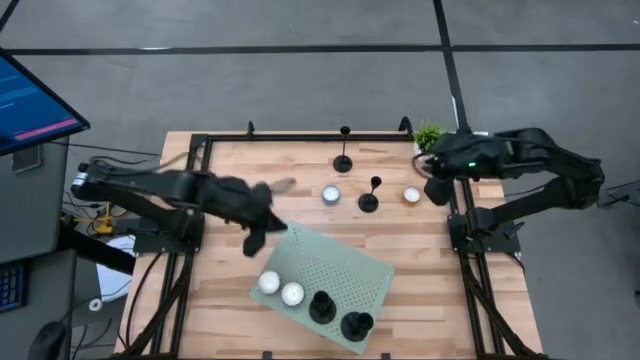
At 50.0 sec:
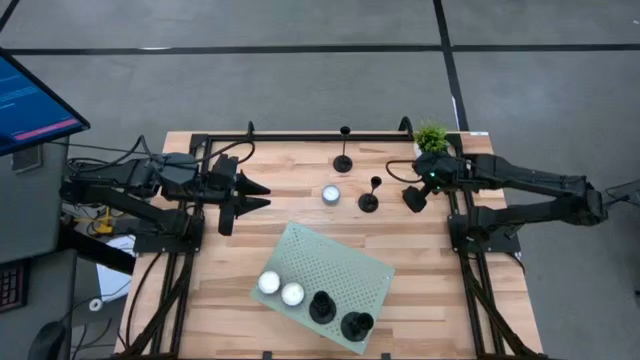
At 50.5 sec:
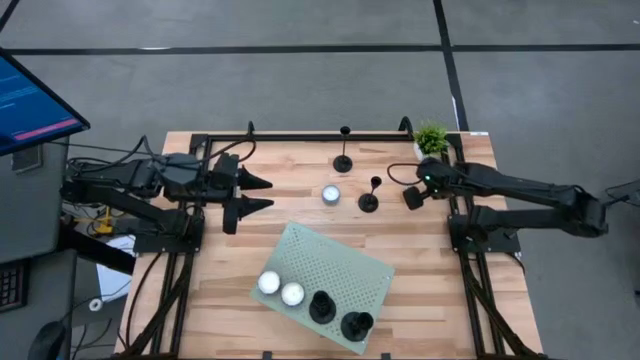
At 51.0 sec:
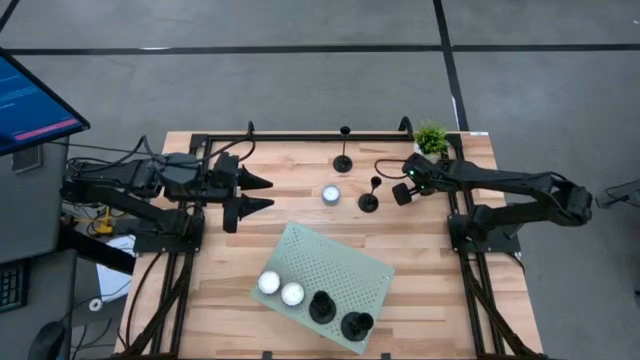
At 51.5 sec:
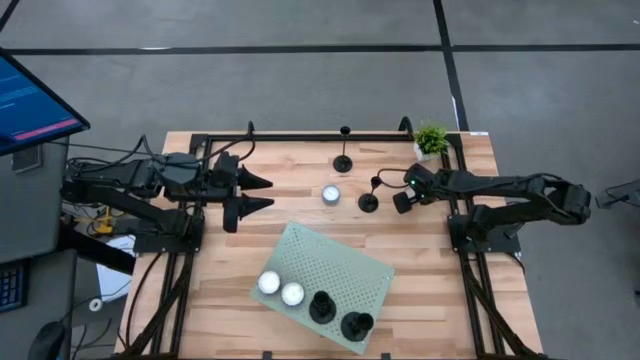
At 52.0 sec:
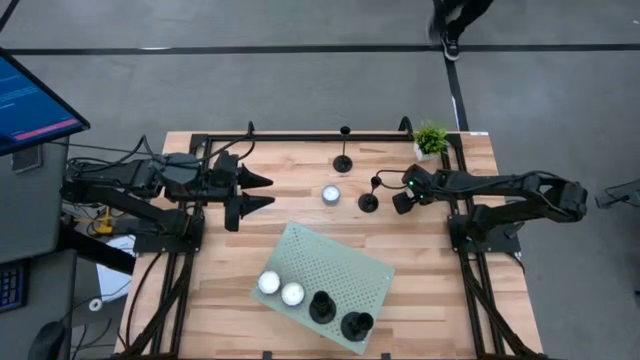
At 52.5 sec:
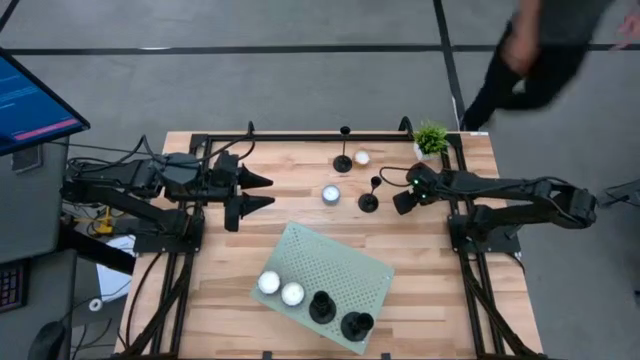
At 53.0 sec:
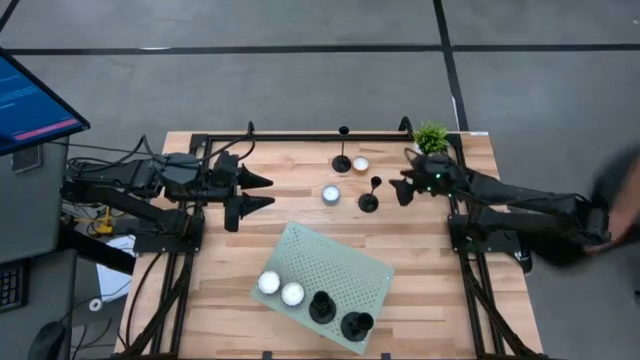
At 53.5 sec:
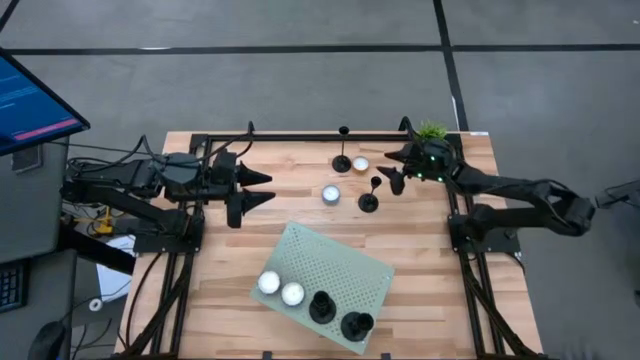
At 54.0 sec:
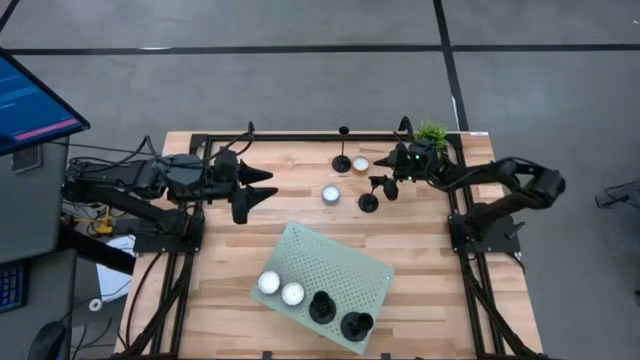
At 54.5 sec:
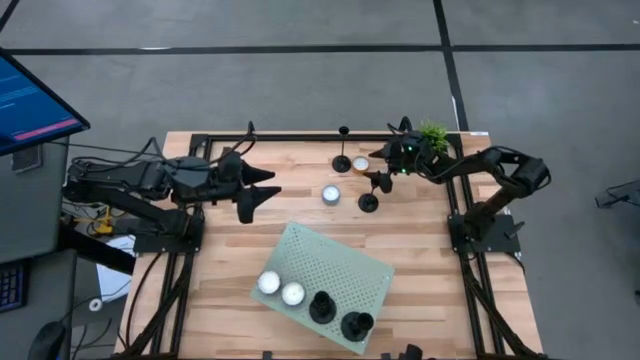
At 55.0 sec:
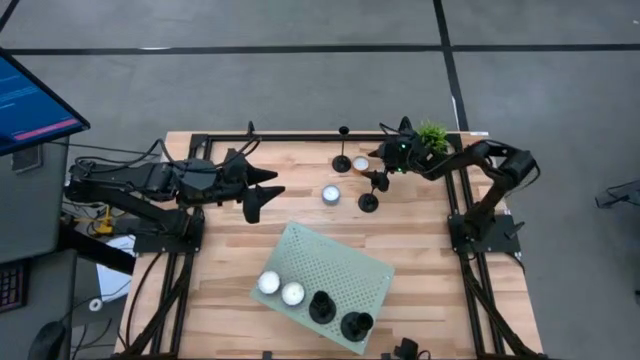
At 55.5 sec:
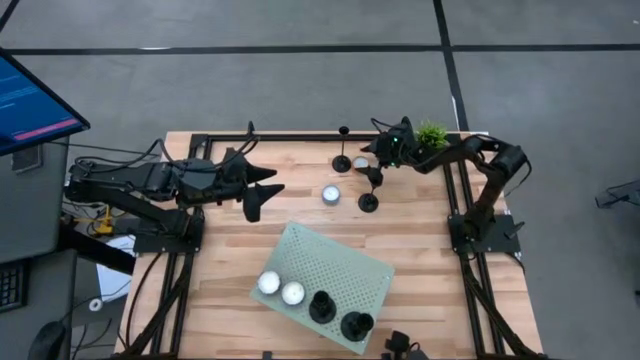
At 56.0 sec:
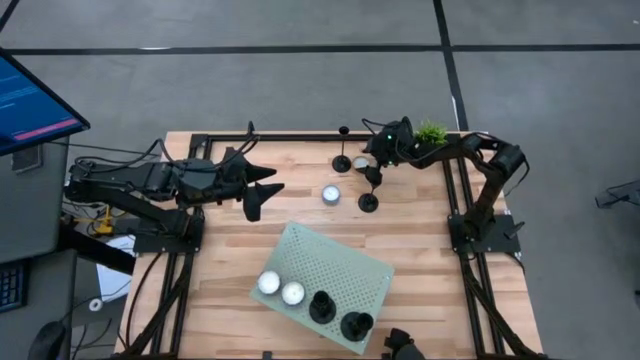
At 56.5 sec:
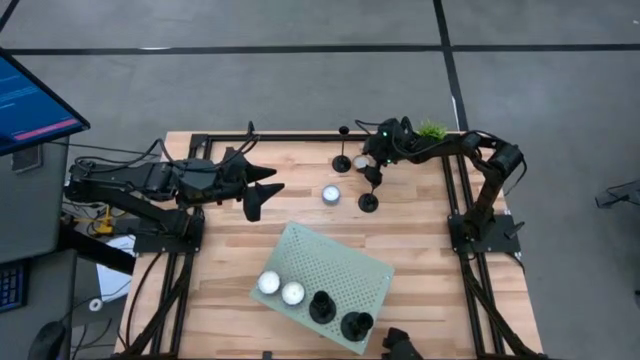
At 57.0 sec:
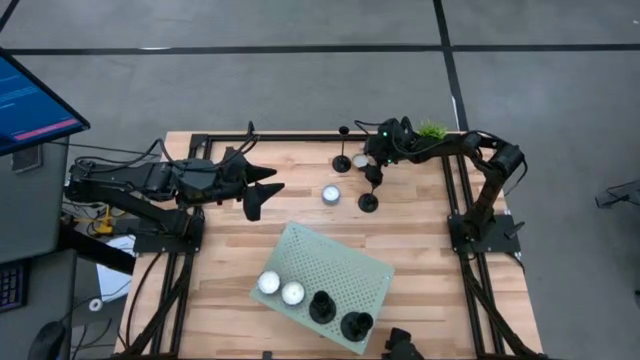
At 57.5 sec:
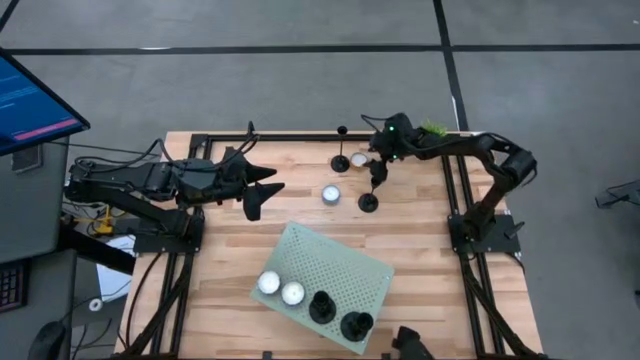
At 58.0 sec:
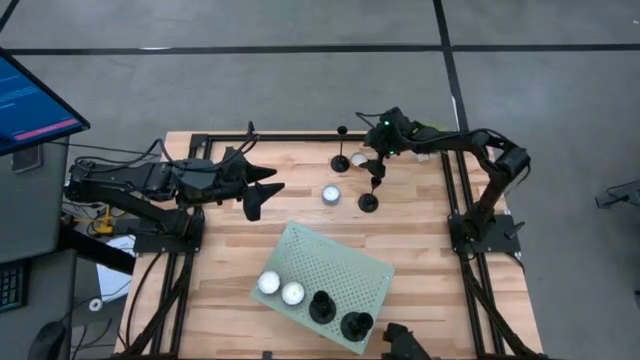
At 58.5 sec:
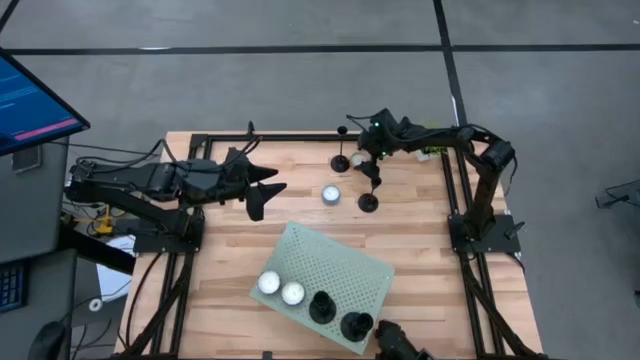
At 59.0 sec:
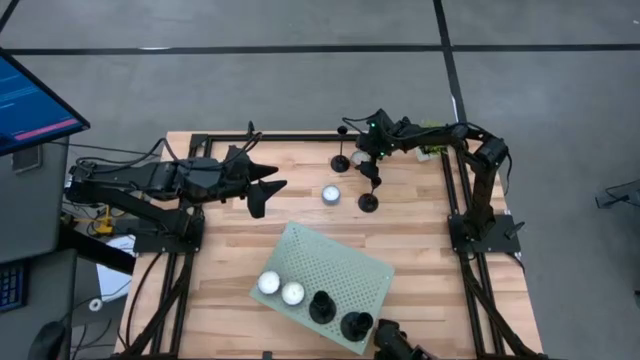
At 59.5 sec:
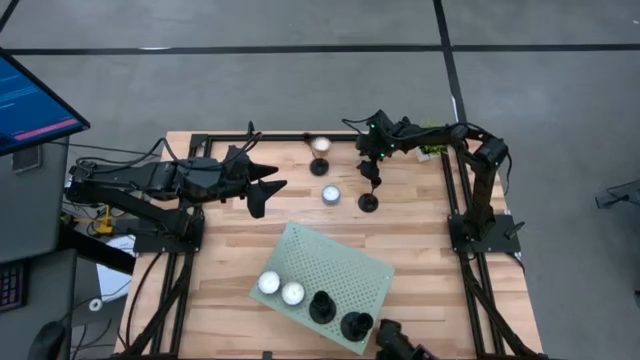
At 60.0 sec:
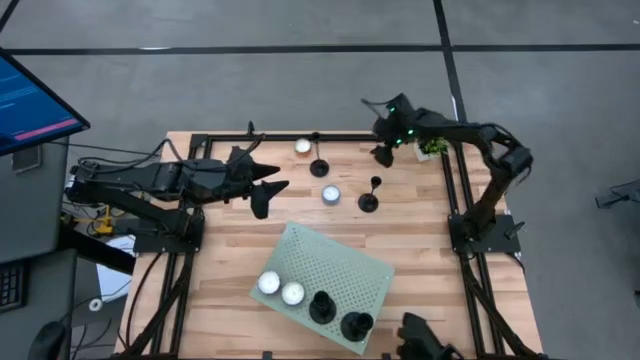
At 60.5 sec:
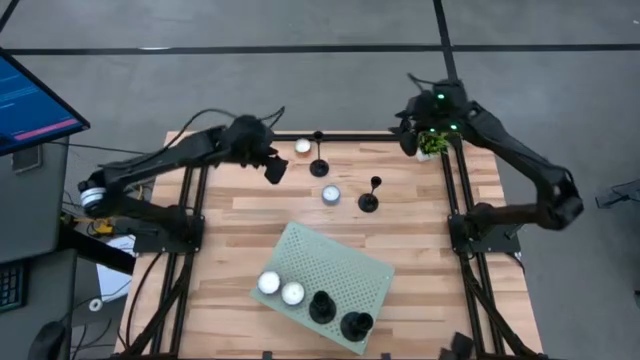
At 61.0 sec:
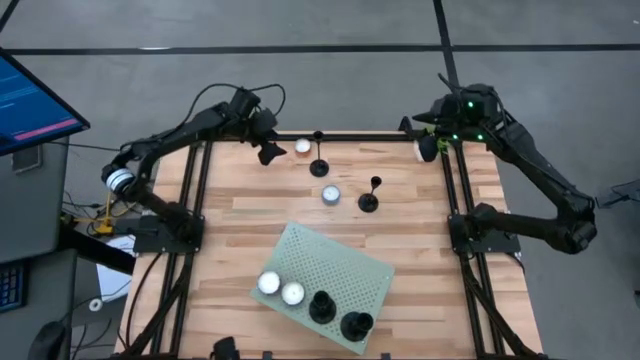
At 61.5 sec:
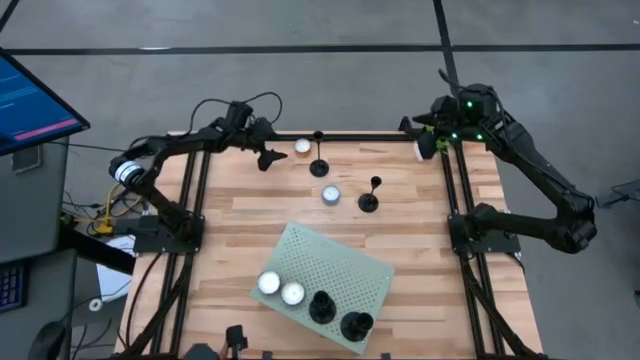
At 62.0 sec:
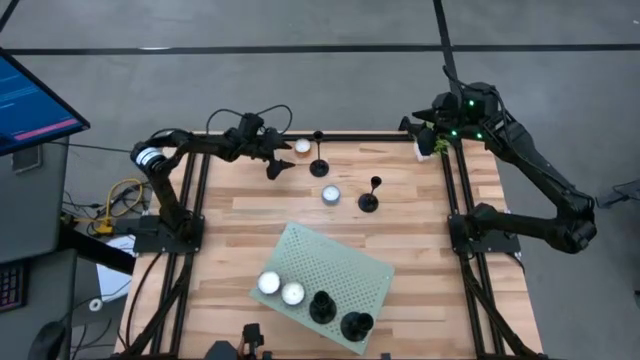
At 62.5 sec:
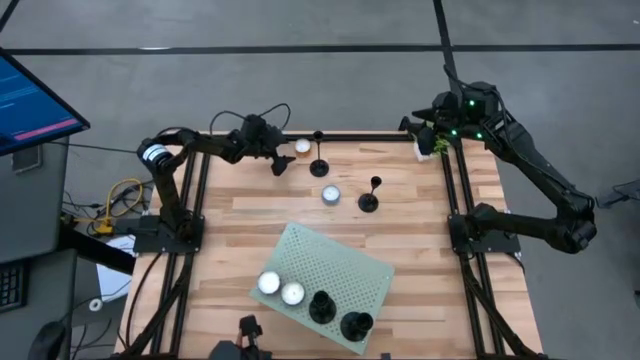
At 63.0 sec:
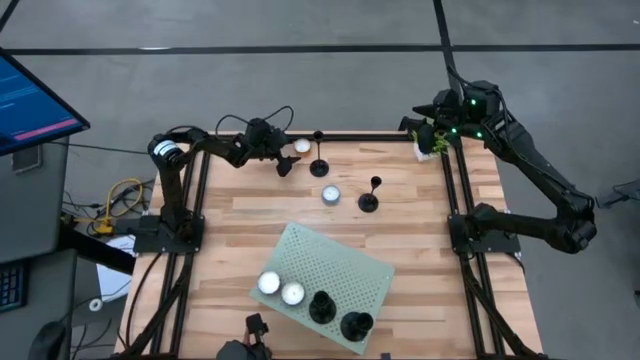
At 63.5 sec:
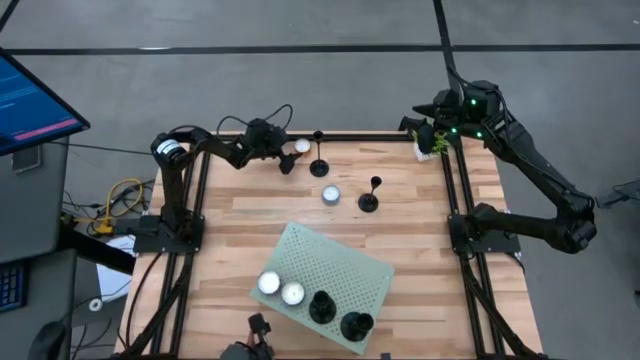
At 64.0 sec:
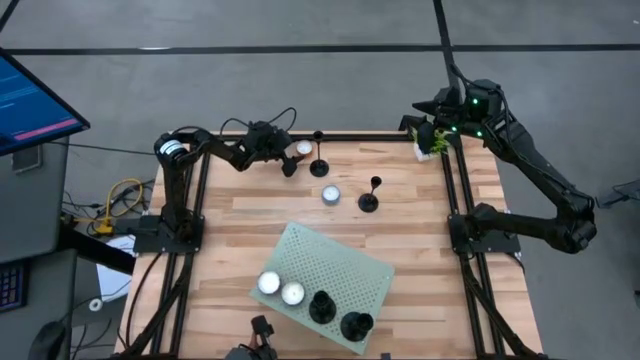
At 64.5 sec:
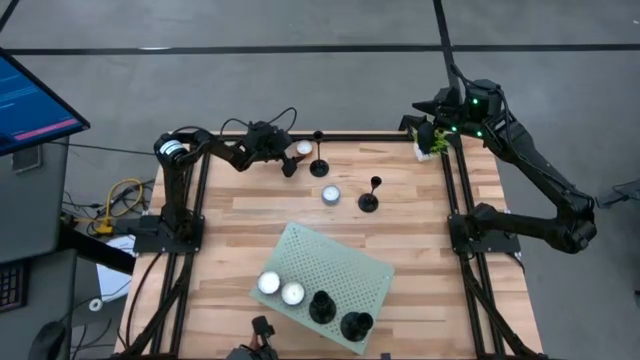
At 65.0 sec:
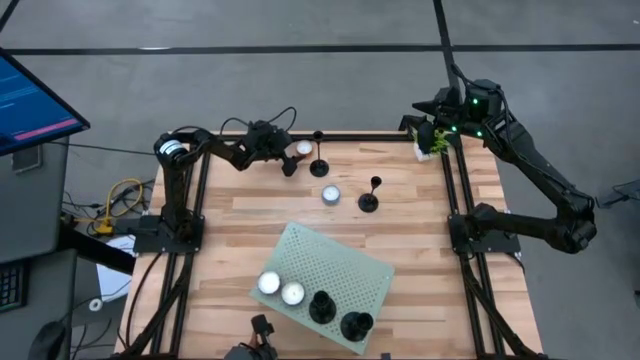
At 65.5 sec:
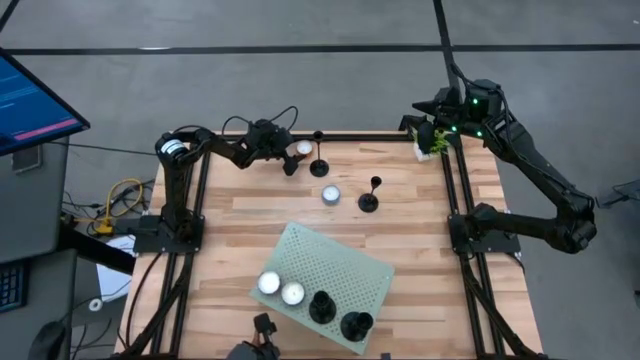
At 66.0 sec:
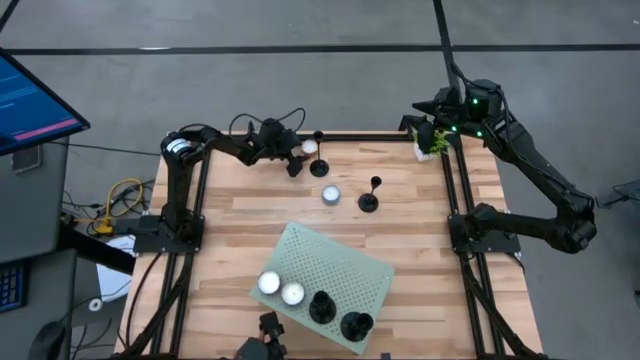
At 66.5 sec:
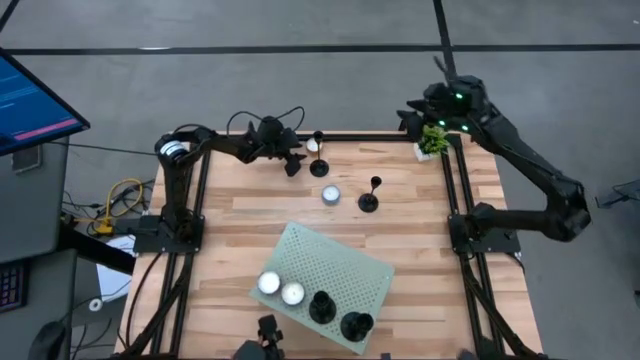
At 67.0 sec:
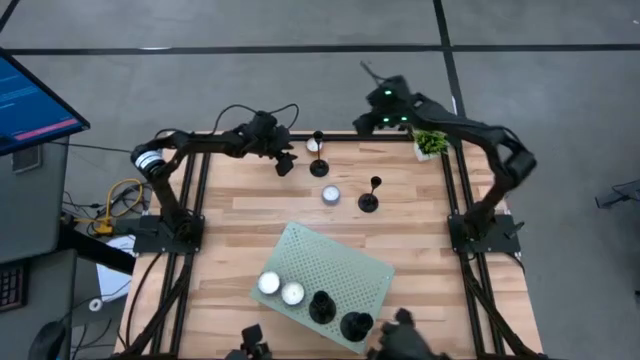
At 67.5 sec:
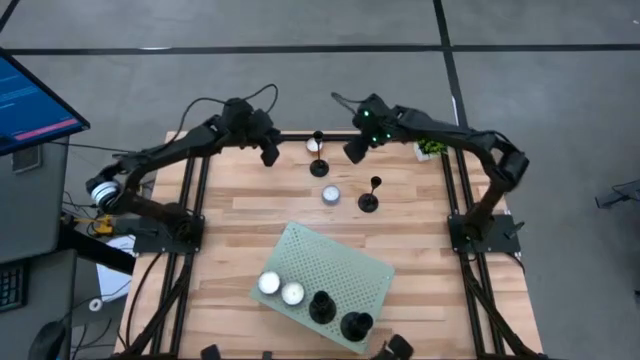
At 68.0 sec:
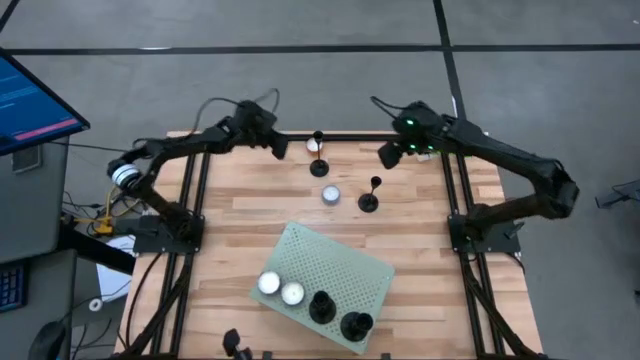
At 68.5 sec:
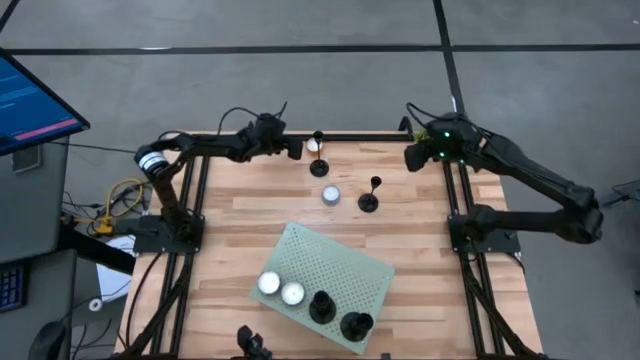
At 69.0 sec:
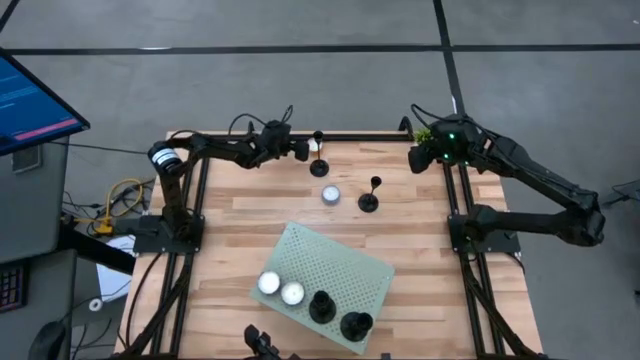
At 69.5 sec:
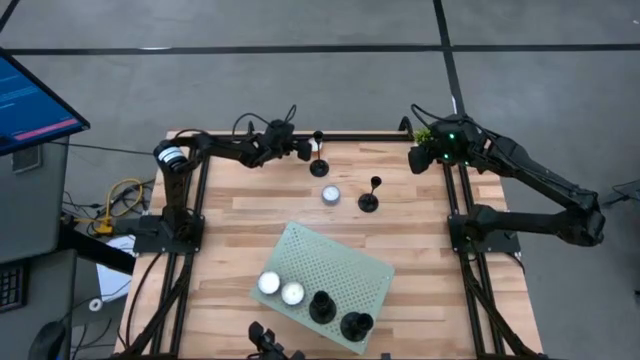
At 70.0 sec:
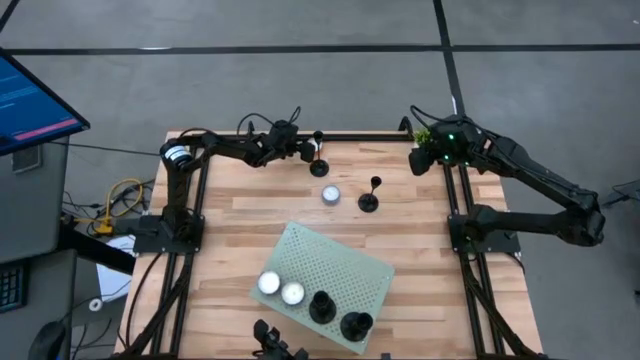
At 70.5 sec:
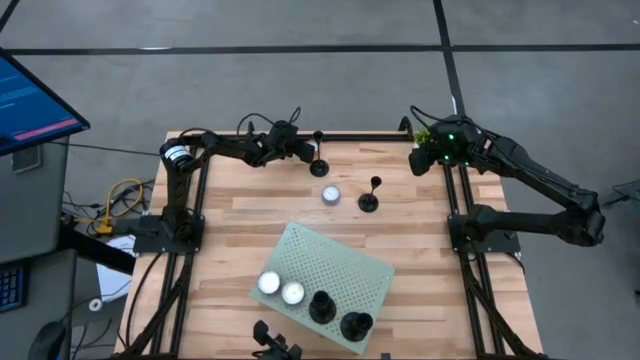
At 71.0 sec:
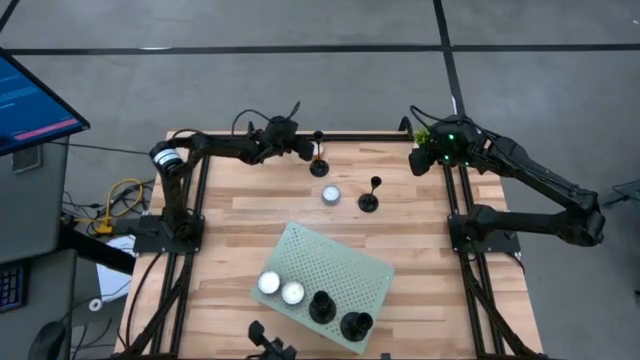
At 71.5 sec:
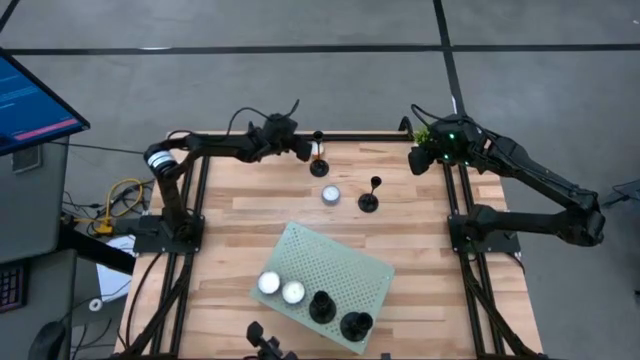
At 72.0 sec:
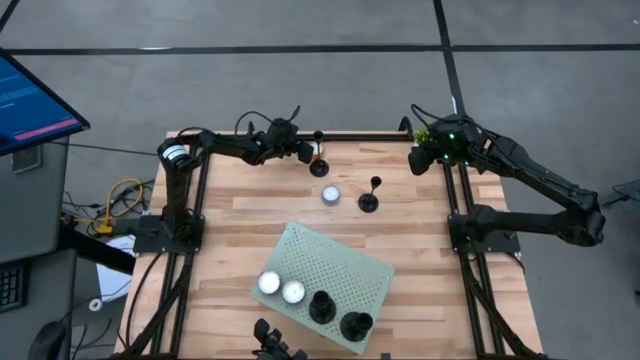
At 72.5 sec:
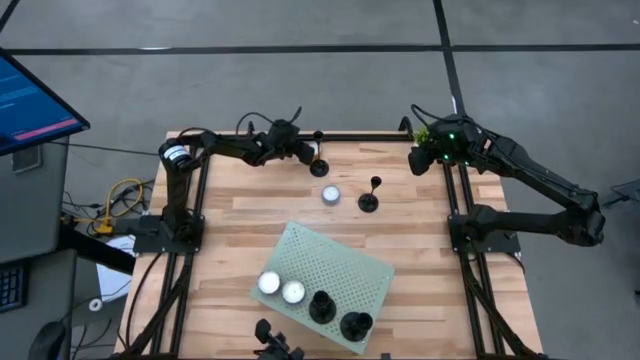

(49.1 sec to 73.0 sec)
Task: Pick & Place candle stick holders
Put the yellow patterned scented candle on the shelf aligned with the other red patterned scented candle
